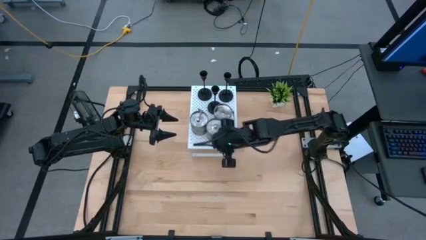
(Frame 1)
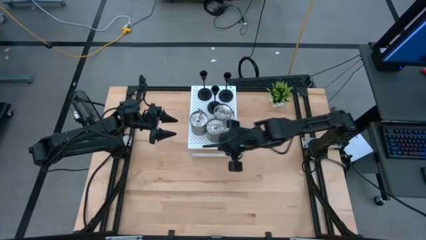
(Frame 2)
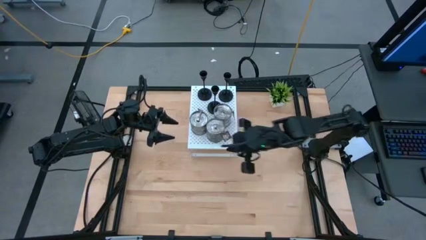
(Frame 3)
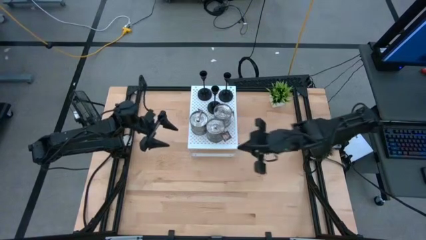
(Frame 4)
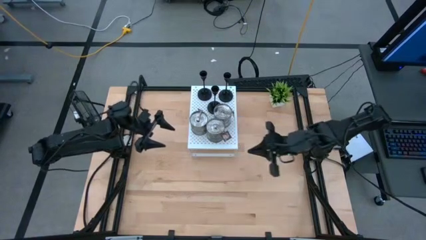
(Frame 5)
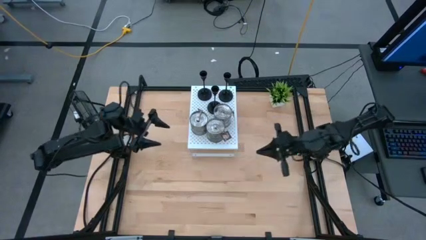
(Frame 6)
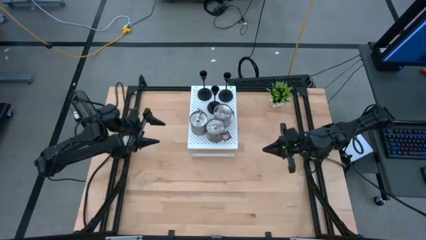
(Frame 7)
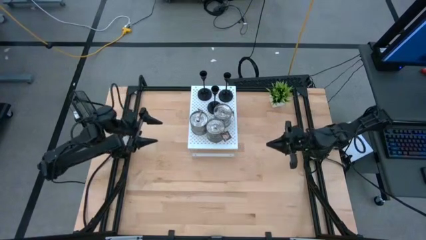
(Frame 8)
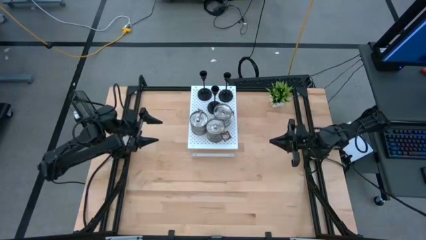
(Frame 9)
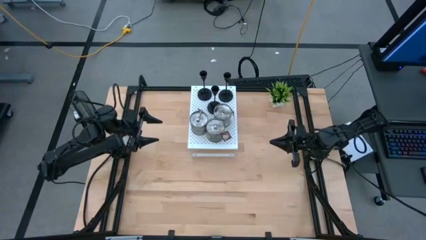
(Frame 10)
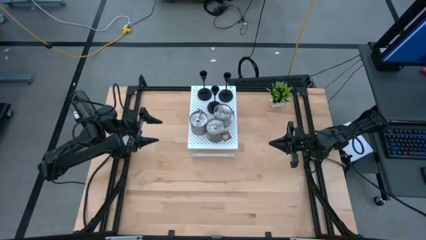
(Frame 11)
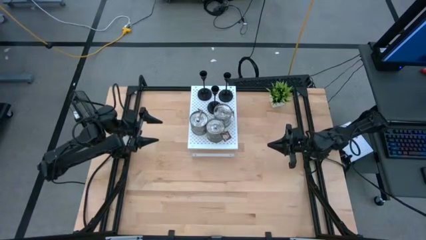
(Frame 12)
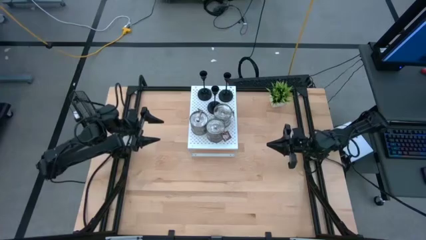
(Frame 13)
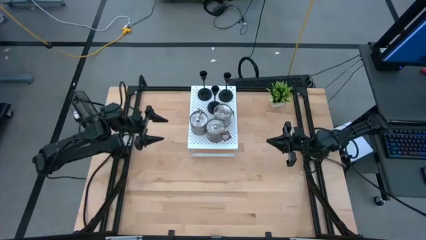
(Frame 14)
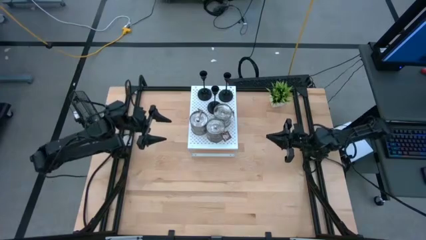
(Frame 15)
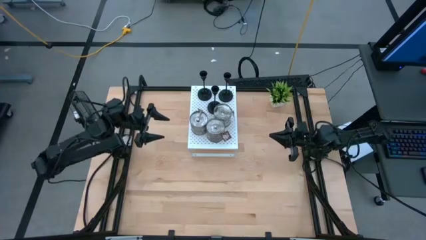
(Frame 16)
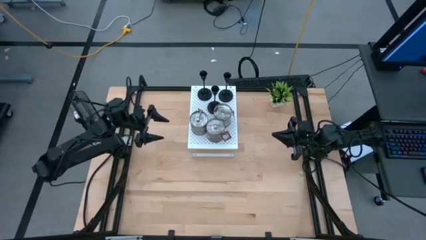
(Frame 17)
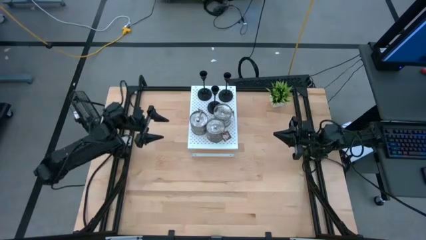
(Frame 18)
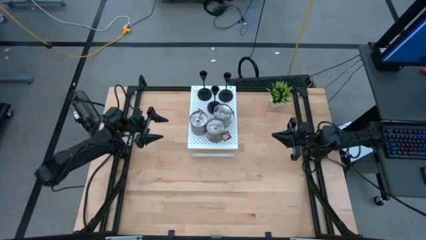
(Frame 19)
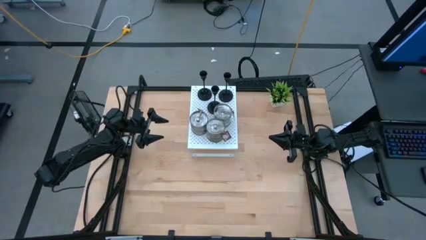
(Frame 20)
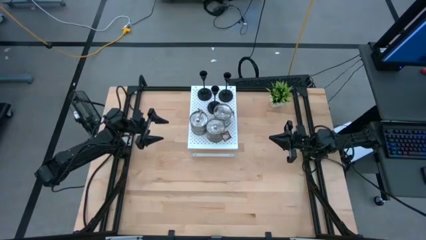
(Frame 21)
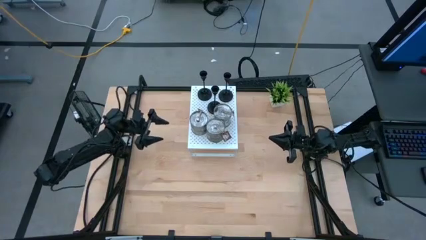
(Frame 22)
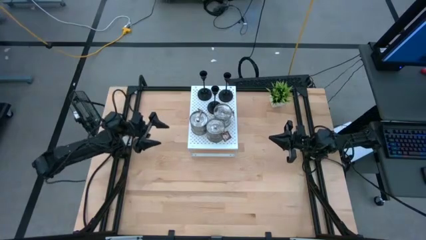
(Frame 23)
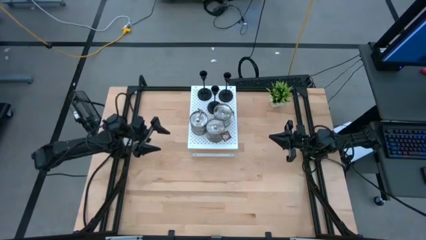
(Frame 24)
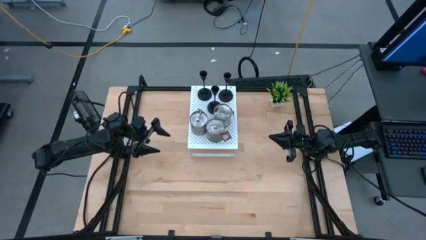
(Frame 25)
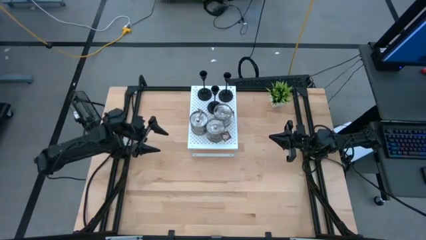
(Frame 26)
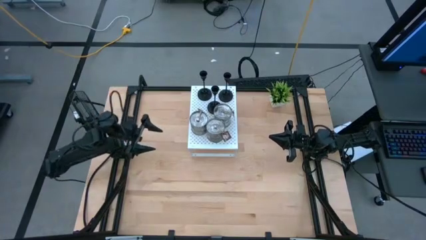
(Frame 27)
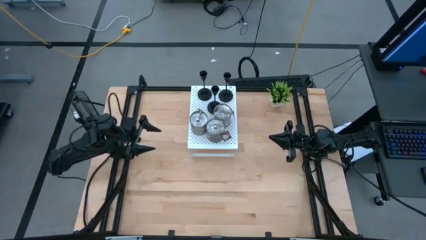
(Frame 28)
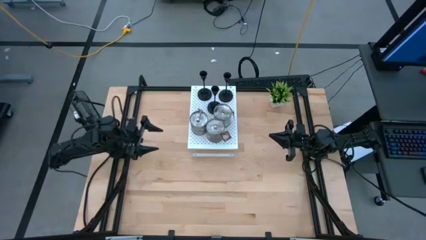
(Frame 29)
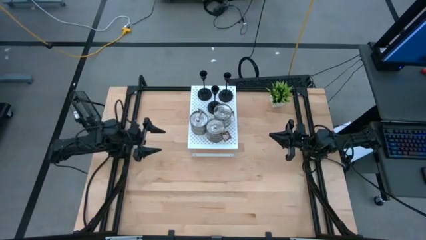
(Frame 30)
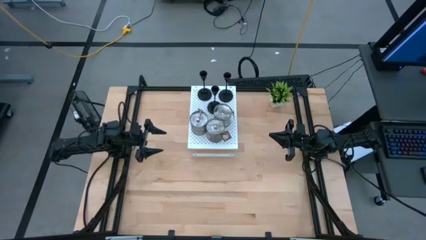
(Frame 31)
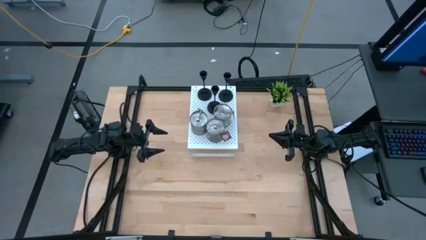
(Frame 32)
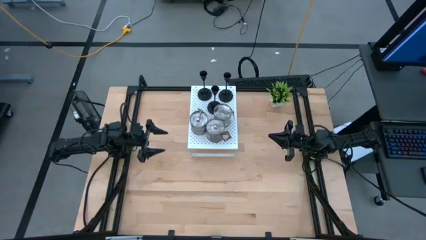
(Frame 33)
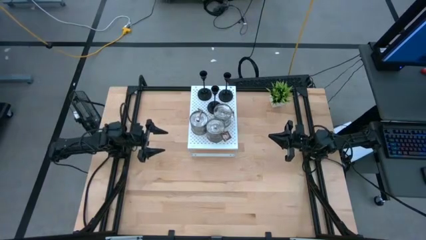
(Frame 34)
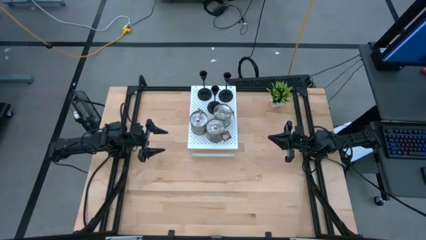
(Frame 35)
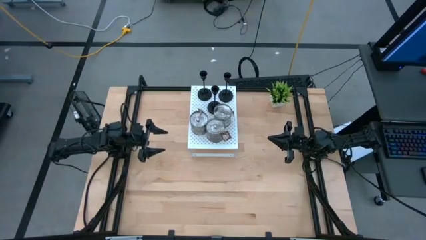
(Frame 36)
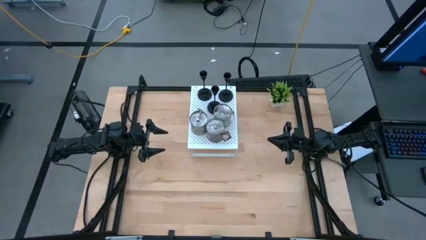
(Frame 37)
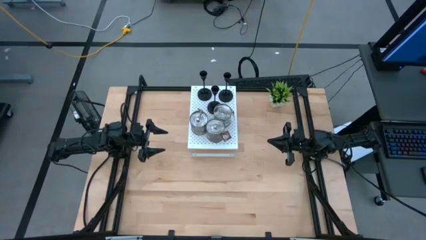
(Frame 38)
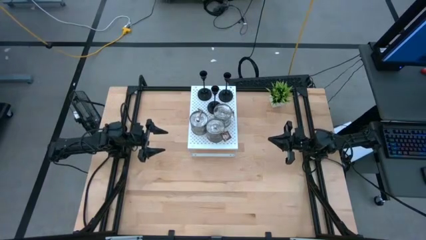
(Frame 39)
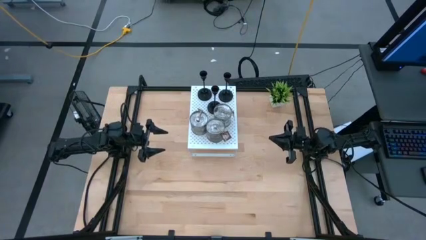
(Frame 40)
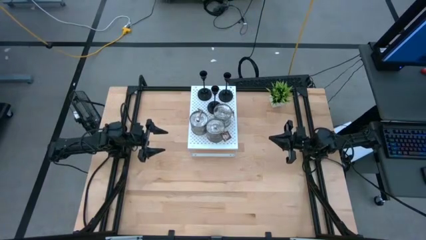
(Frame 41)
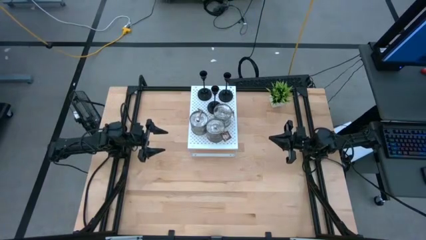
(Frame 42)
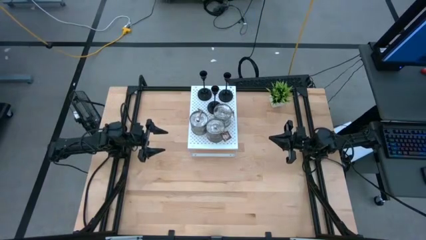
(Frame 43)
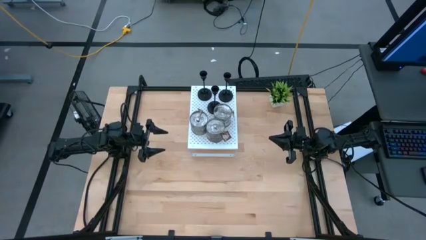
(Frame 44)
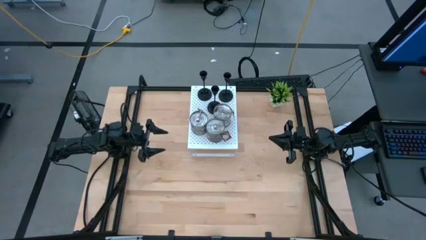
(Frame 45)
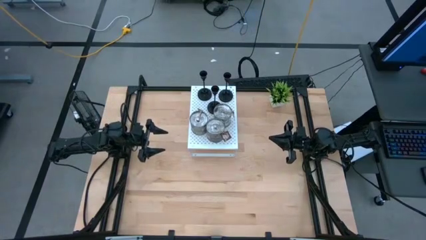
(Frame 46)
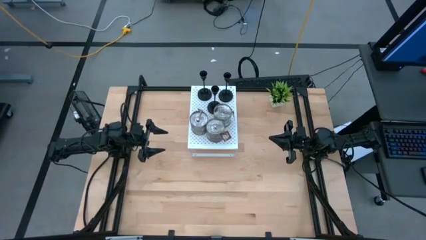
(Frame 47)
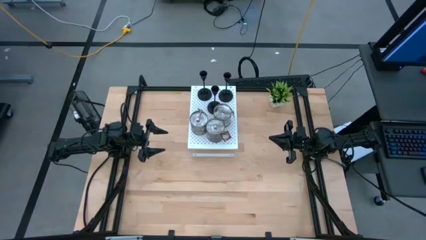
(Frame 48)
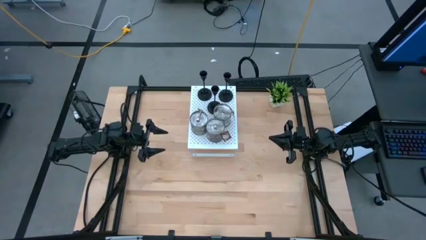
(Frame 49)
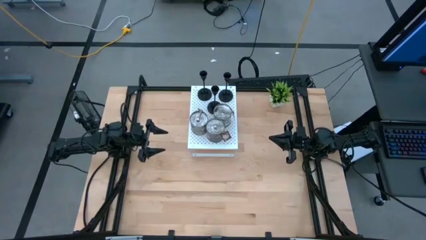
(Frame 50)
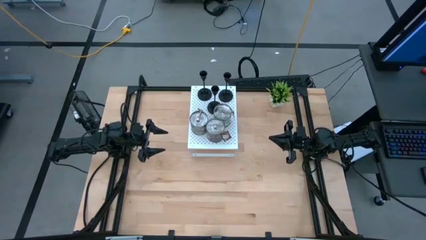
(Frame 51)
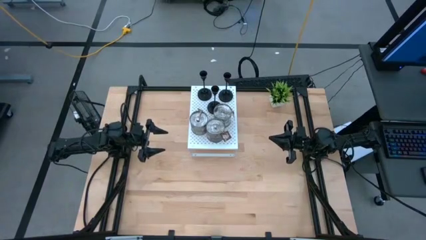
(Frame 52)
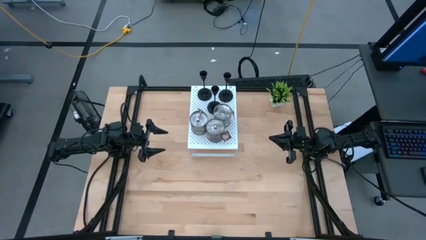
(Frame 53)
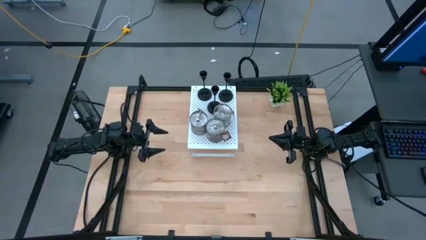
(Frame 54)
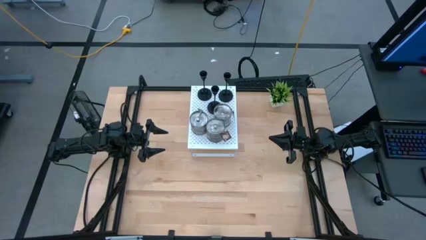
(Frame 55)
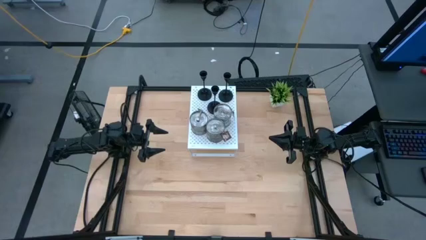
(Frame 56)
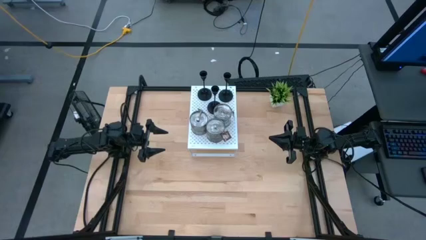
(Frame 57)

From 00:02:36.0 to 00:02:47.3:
Task: Pick & Place candle stick holders
Return to Home Position

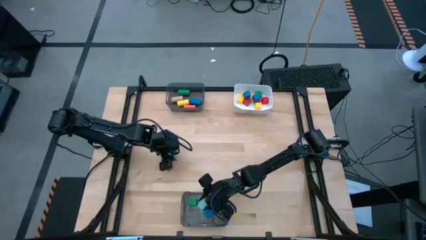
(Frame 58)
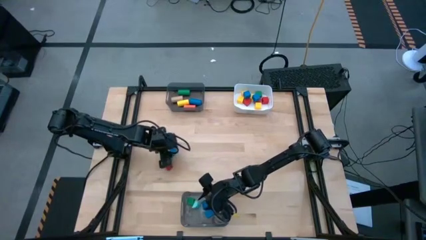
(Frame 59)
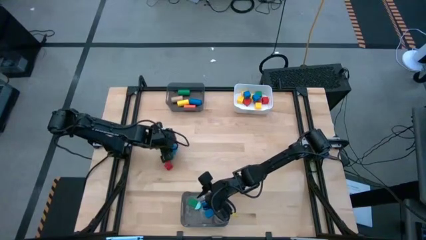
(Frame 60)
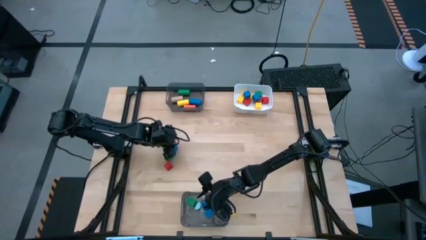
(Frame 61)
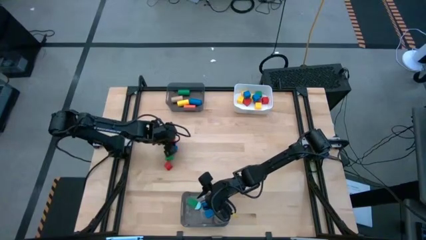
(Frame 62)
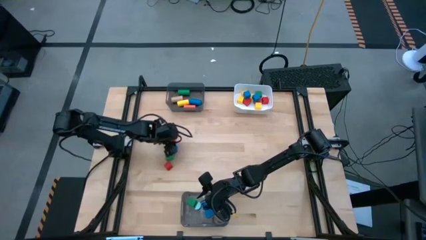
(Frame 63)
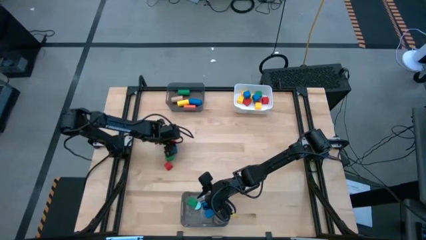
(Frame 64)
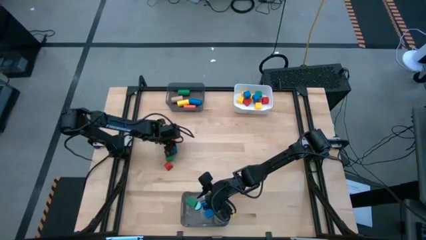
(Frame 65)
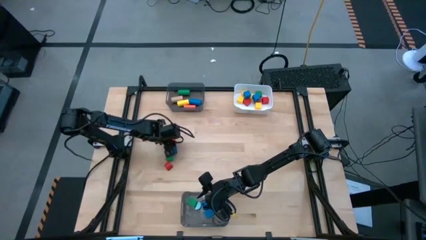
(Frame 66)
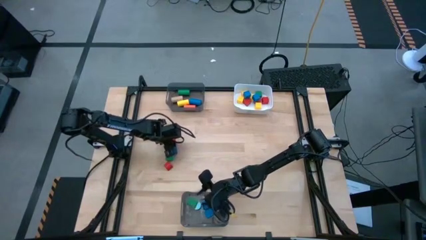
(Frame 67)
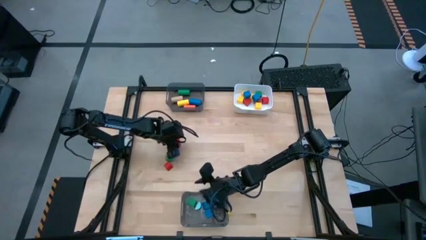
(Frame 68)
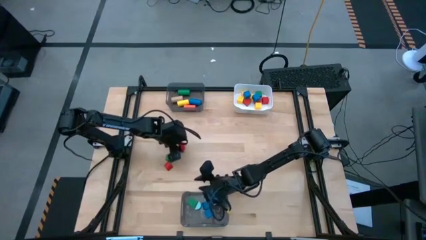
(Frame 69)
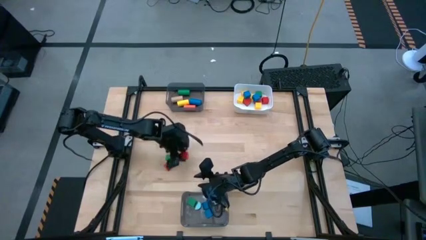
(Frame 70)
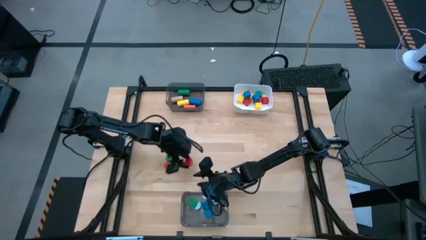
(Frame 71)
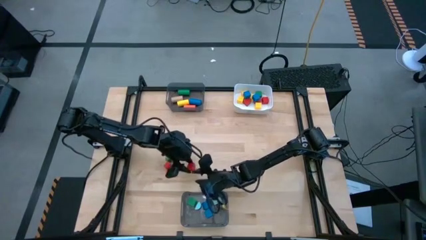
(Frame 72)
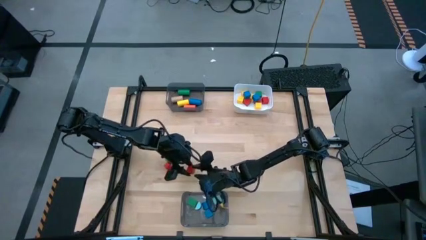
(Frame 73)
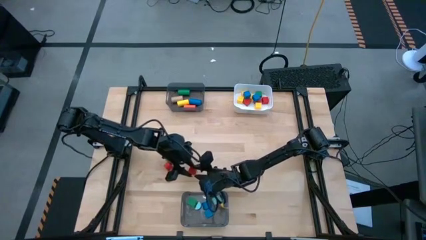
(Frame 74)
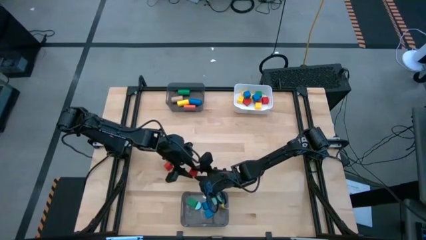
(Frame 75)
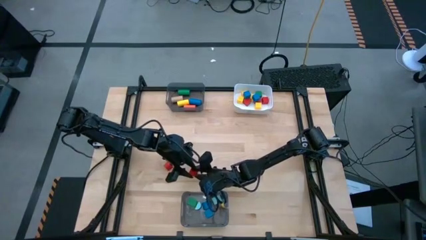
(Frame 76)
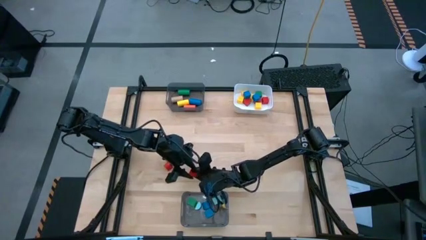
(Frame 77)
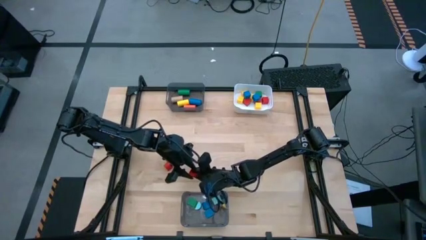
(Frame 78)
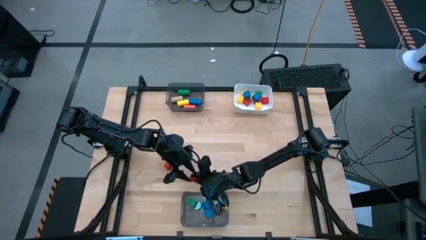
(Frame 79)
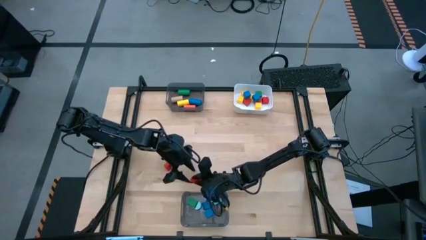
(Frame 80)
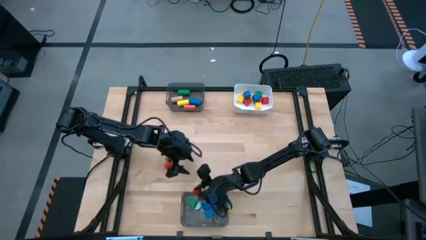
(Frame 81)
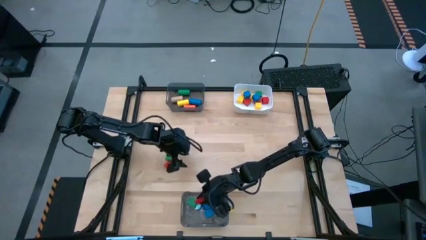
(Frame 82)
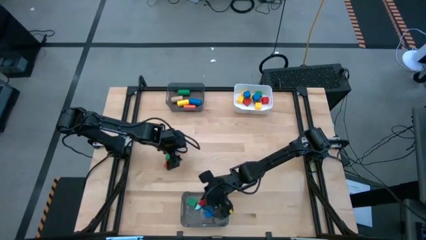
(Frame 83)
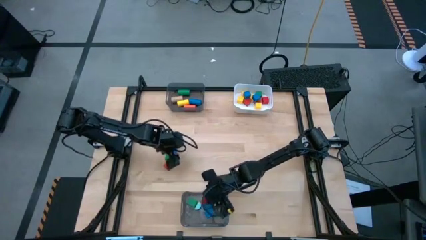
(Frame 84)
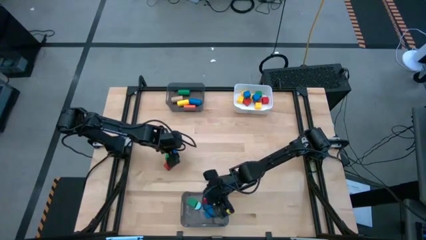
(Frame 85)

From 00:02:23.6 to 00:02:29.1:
Task: Sort blocks by size
Put the red half circle block into the bottom black bin
